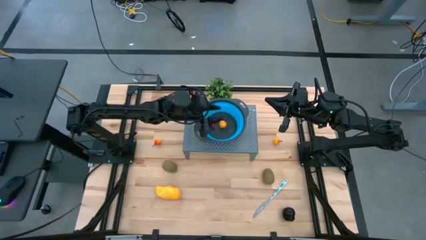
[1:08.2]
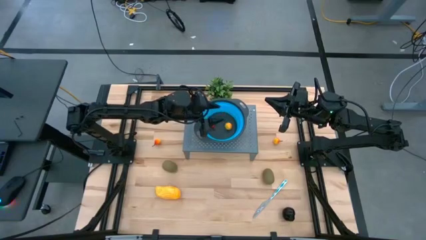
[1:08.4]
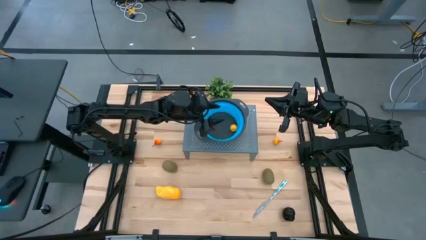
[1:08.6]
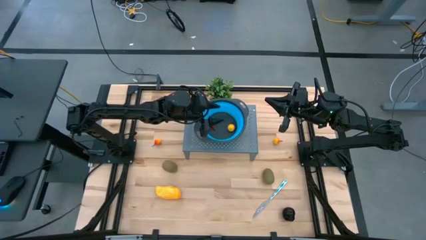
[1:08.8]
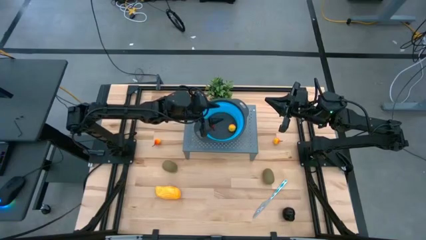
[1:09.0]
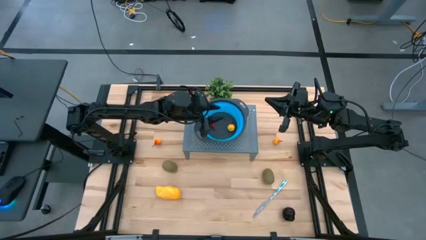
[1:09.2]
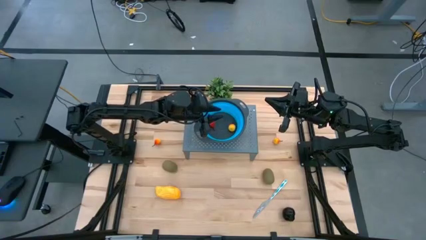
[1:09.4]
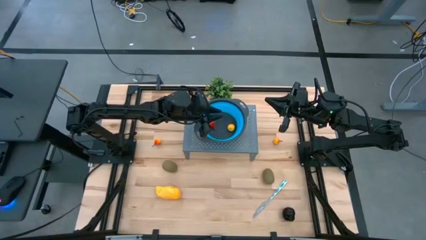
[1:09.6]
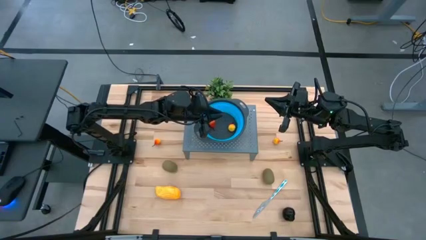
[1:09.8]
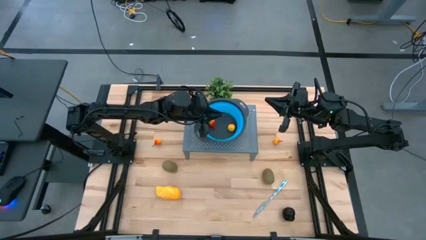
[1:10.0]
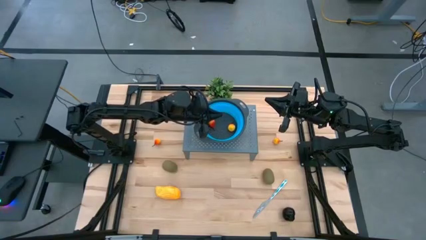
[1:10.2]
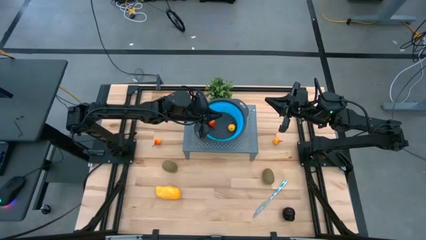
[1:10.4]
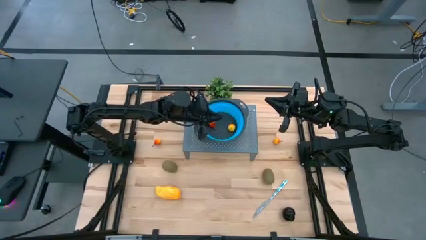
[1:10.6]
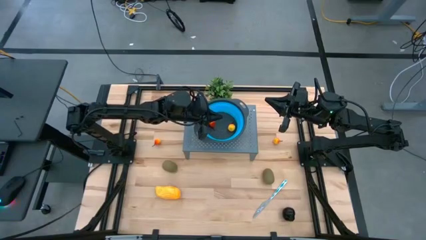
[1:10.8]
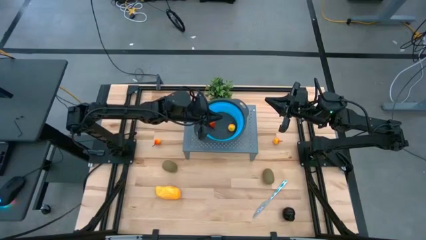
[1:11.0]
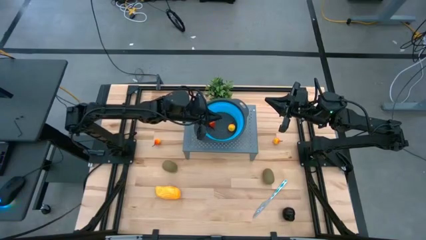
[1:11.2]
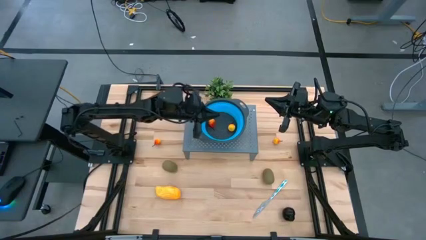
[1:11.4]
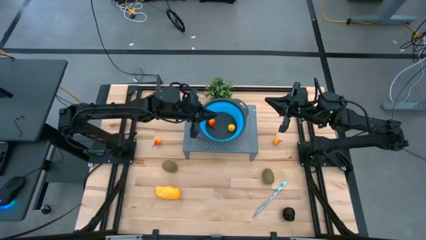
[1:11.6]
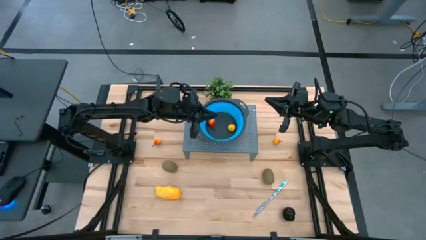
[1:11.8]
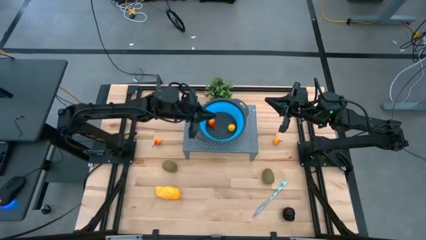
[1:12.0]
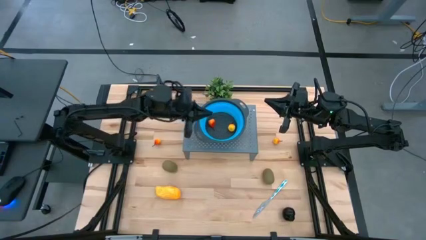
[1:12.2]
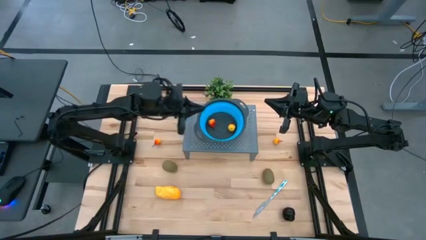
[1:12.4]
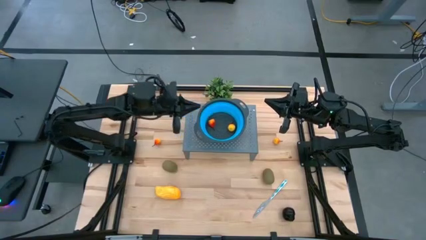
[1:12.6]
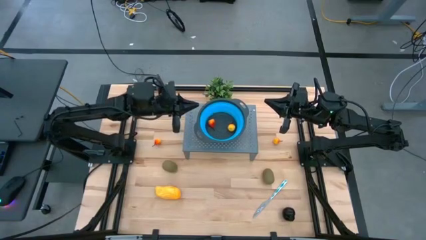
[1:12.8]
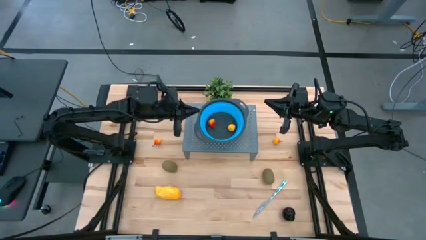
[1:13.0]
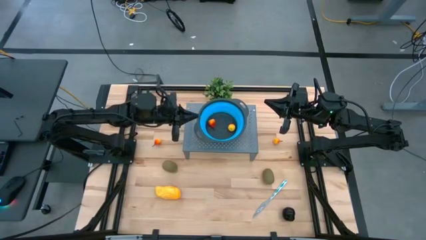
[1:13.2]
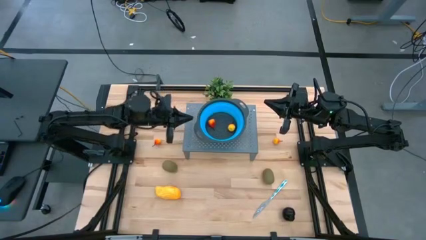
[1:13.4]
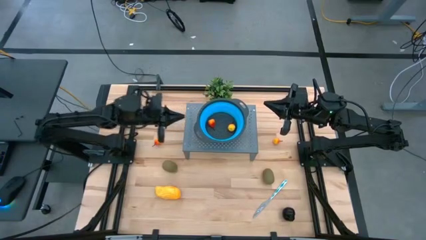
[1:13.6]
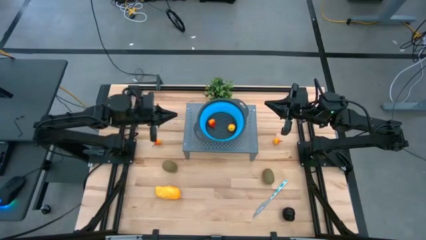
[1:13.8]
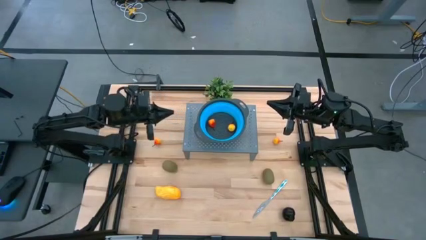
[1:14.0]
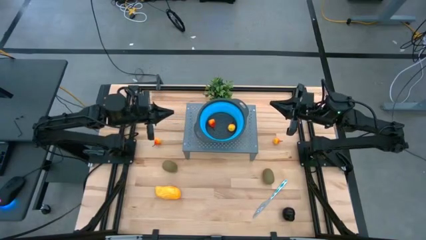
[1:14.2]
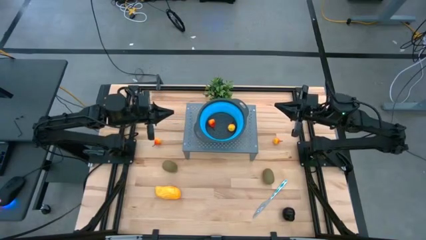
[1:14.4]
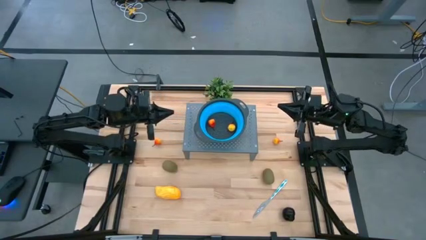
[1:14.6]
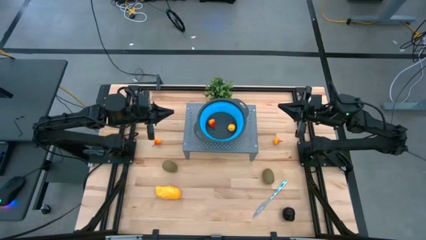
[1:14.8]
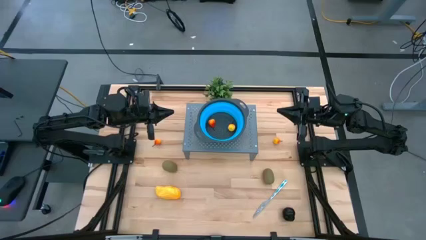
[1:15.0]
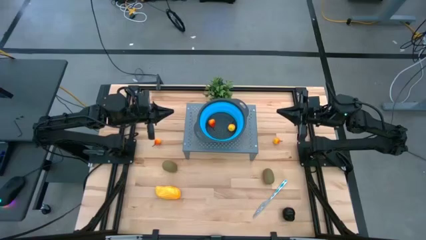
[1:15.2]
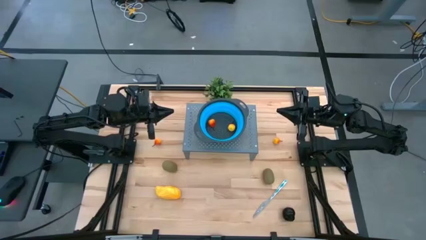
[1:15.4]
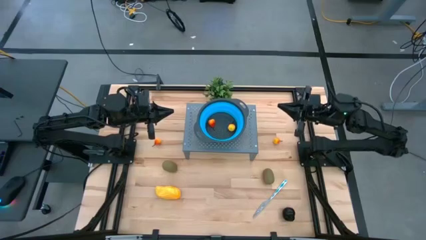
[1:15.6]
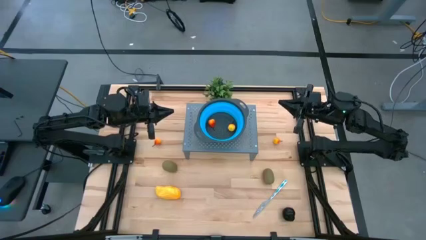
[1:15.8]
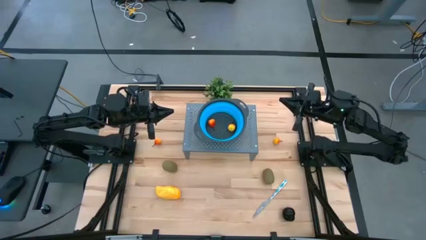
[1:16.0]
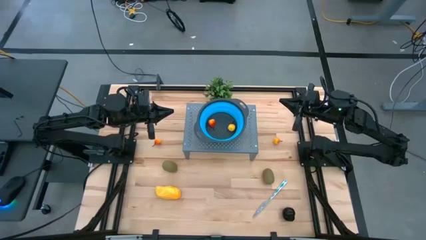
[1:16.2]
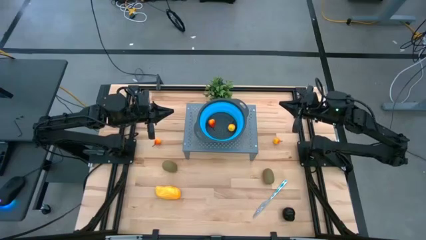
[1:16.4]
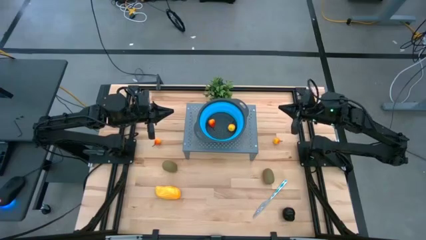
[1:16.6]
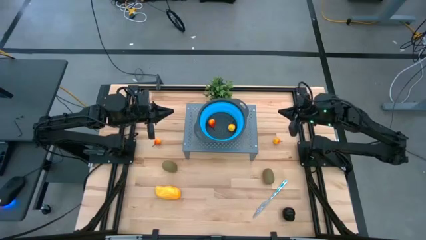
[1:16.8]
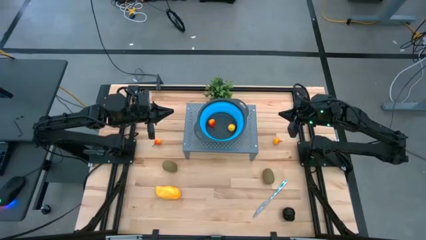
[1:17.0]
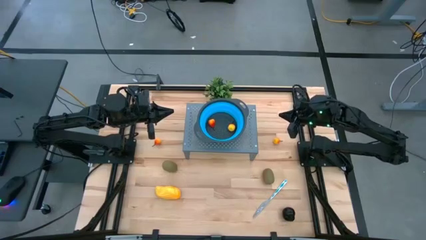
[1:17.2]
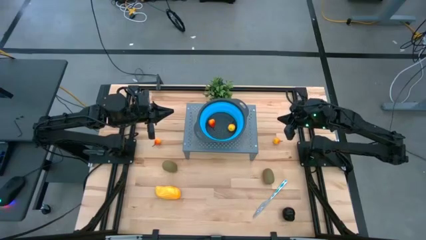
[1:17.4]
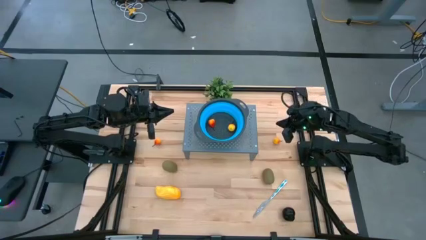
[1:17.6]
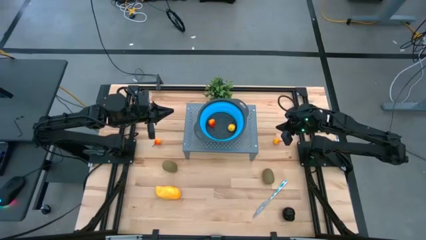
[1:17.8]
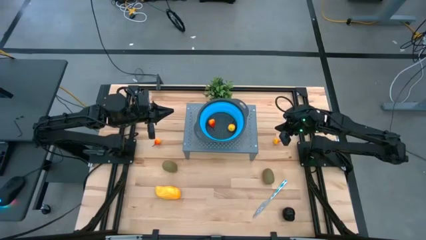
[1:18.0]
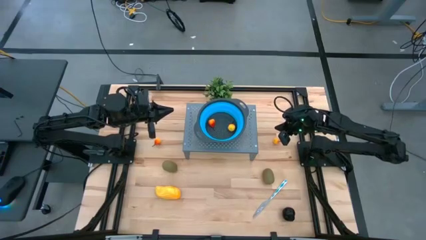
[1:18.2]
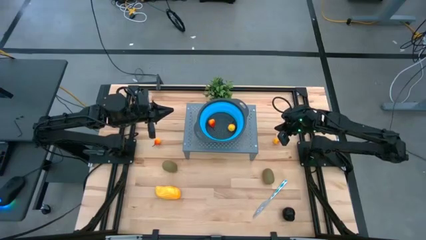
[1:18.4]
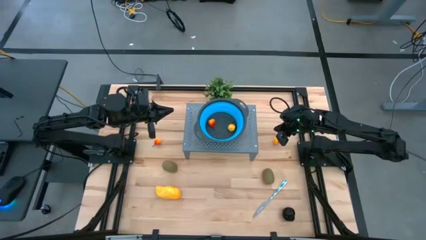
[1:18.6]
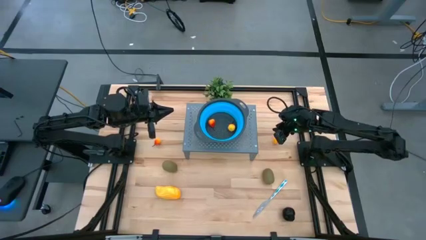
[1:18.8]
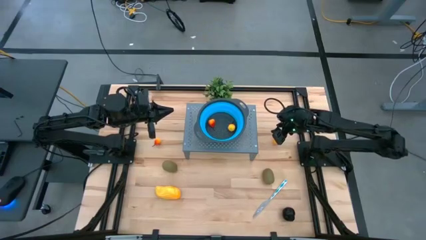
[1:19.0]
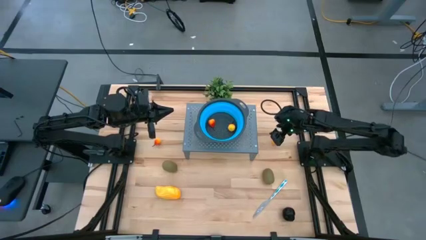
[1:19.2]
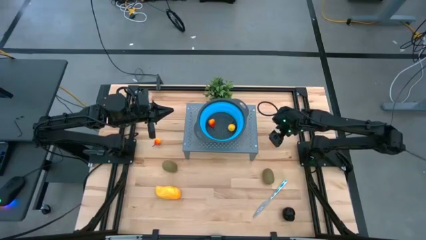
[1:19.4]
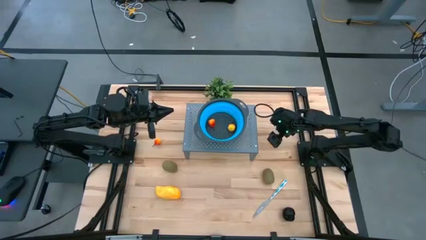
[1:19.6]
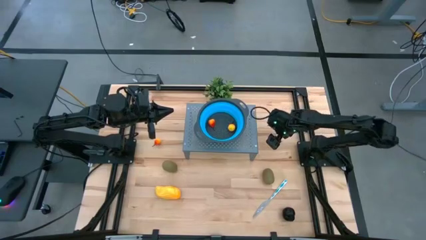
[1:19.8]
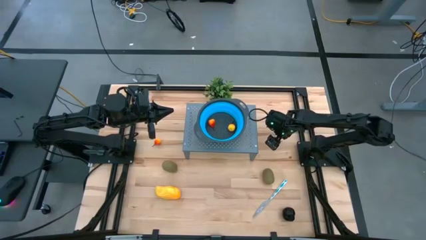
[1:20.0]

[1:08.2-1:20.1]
Task: Pick & Place Fruit
Put the right orange pear into the strainer bowl on the shelf

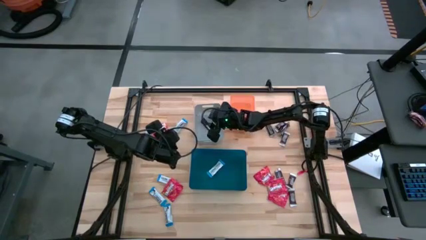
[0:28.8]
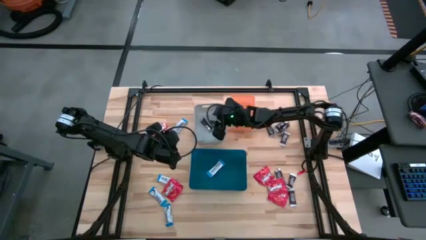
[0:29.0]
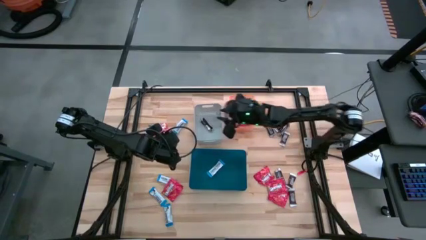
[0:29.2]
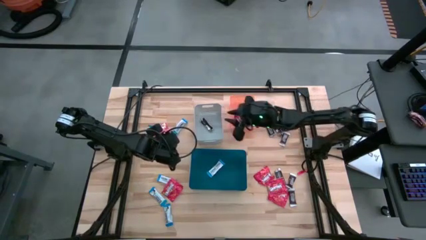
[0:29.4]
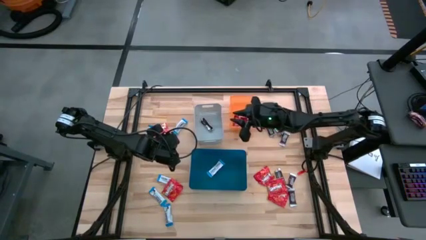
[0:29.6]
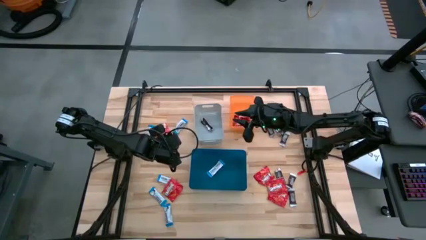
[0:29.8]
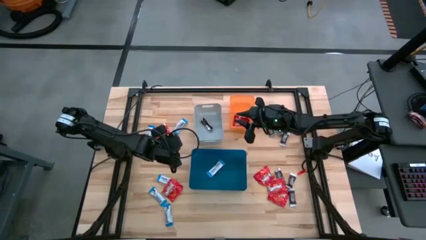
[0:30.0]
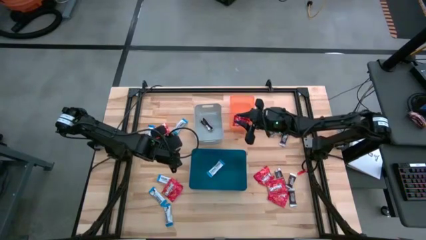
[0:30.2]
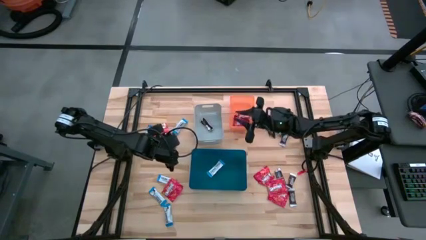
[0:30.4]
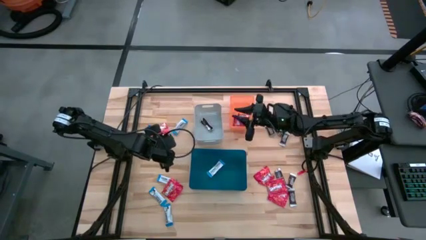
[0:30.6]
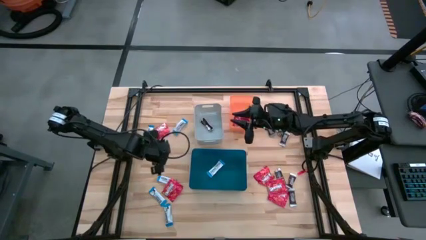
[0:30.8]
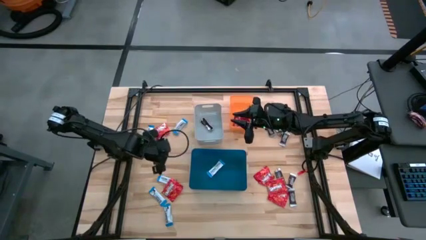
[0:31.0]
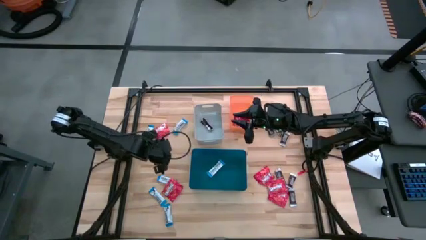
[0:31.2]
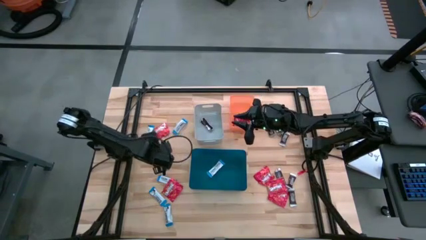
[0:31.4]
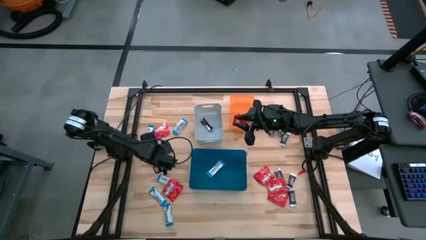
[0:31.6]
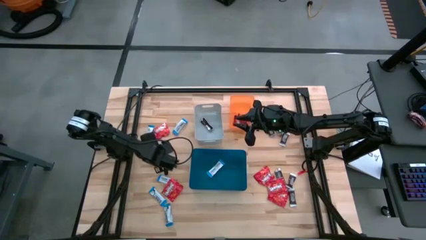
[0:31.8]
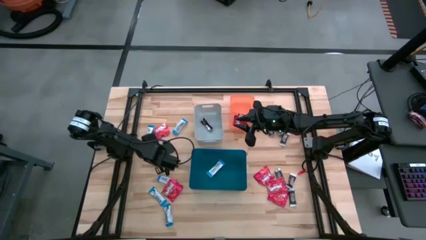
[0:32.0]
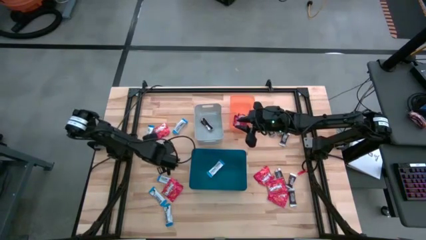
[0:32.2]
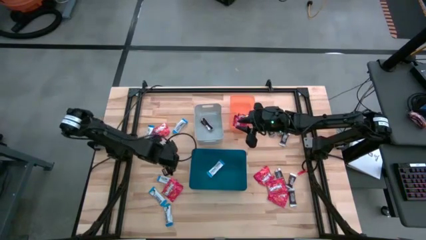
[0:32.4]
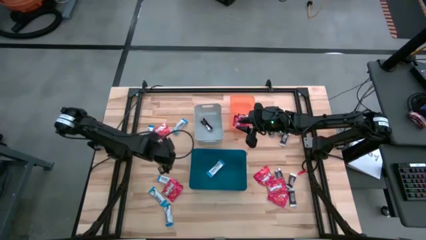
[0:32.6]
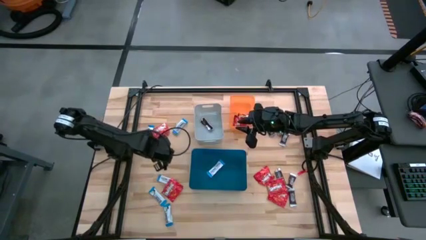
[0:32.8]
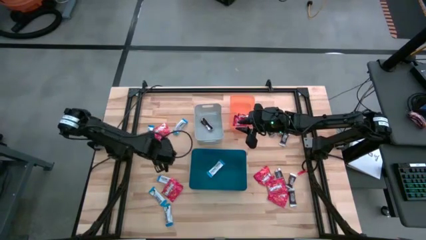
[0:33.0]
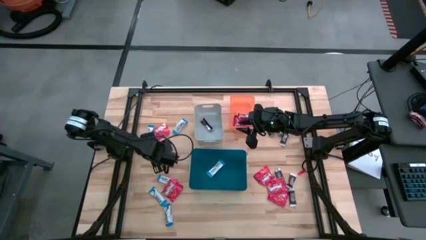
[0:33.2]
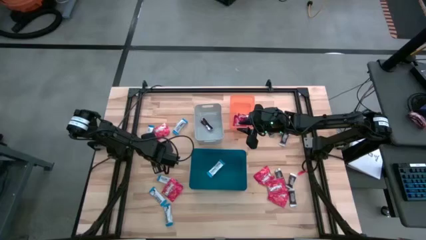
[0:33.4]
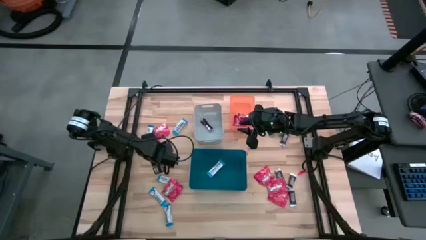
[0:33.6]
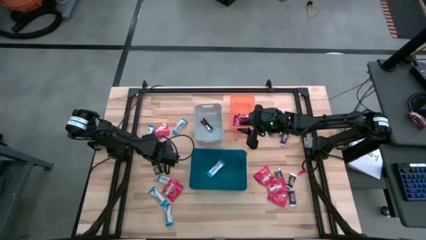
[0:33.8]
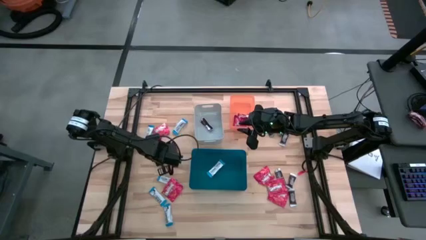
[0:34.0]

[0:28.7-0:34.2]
Task: Sort candy
Put the white chocolate bar into the blue bin
